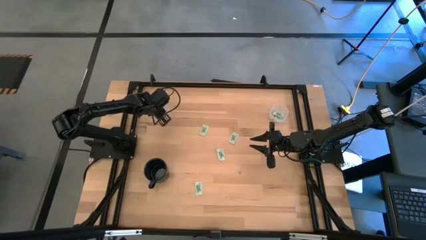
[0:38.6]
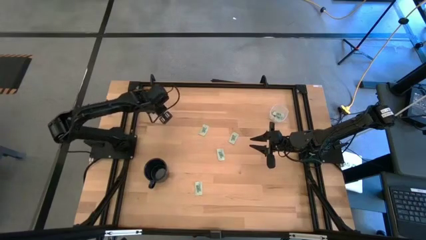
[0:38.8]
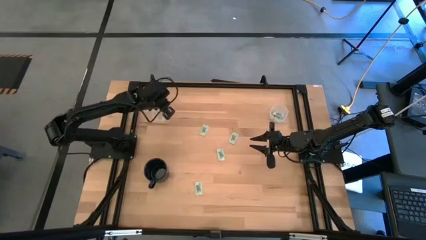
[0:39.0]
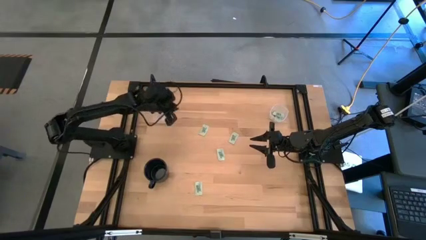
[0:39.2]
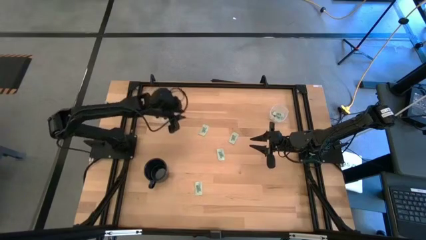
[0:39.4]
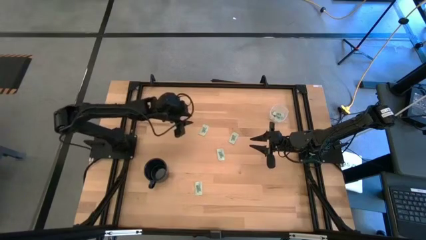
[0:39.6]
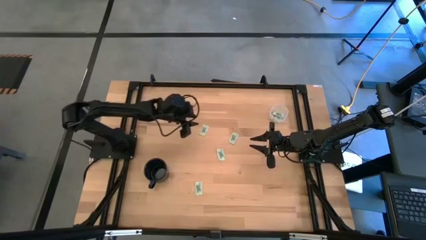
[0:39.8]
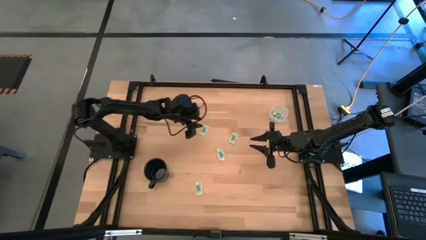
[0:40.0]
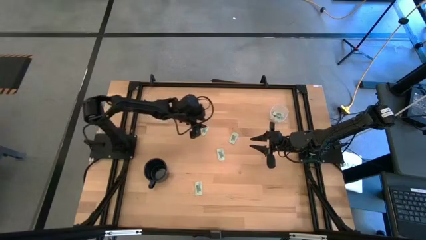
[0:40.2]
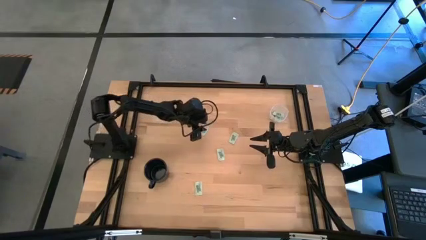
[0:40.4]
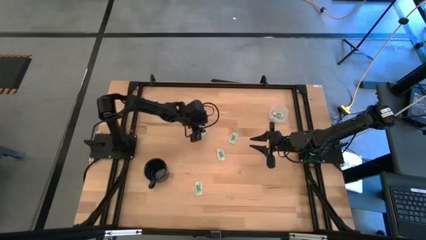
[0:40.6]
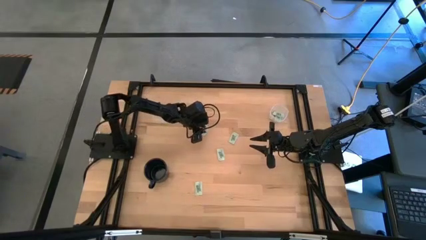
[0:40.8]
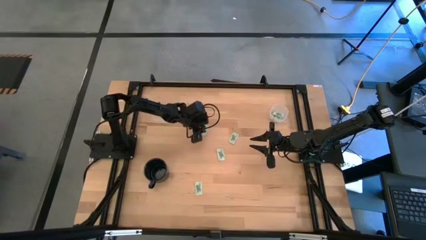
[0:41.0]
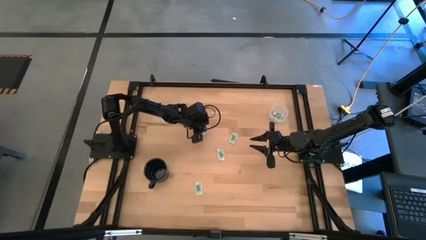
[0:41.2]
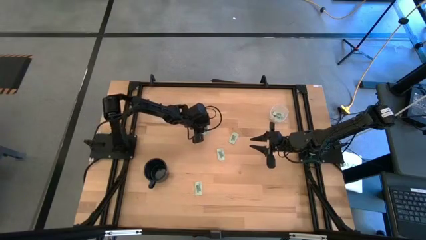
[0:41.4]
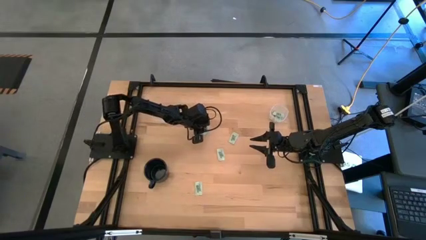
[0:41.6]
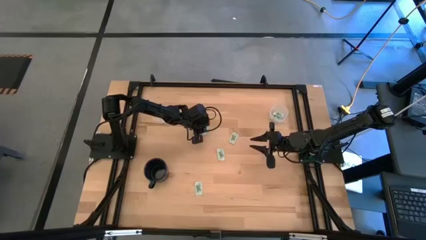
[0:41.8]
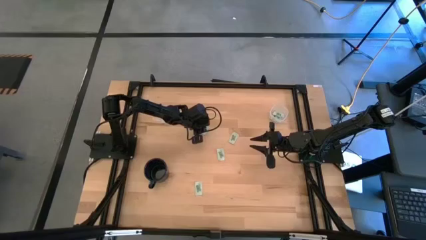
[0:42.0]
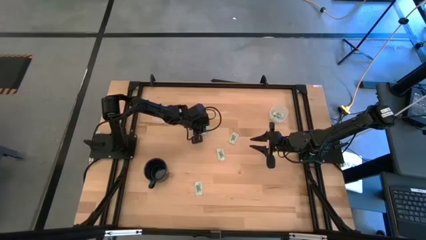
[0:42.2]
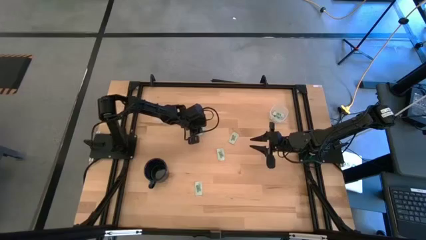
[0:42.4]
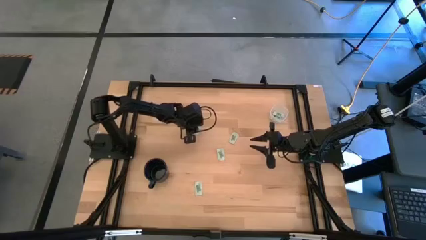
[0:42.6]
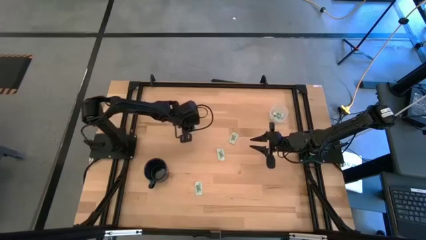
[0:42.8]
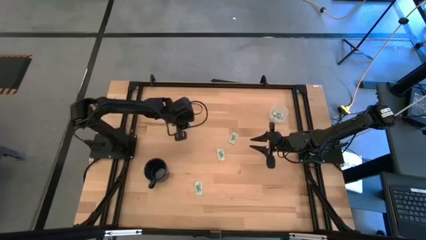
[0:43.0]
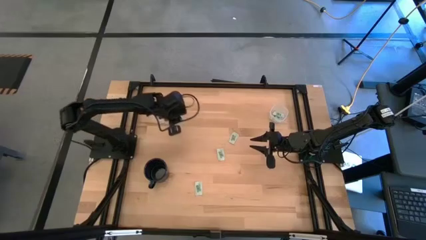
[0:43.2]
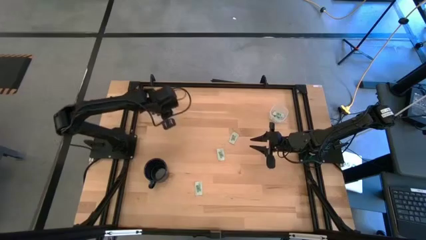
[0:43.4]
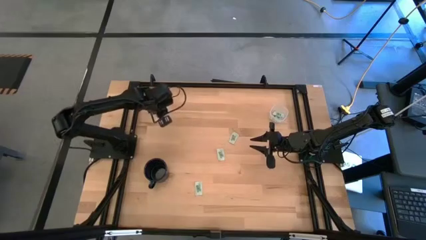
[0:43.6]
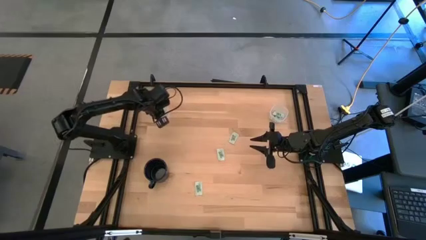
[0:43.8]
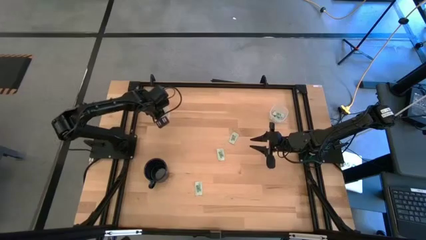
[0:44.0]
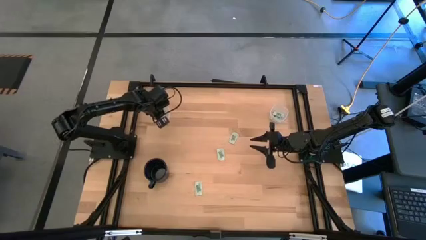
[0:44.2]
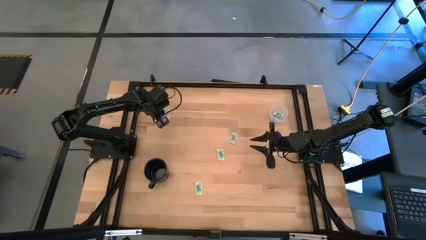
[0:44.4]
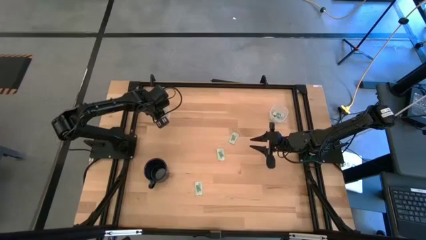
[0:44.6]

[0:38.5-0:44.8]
Task: Pick and place Stevia / Truvia into bins
Put the stevia packet into the left transparent container

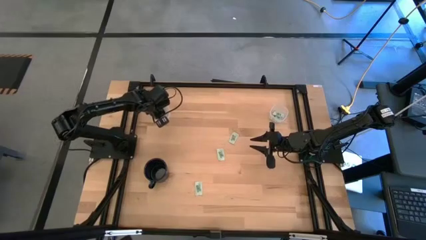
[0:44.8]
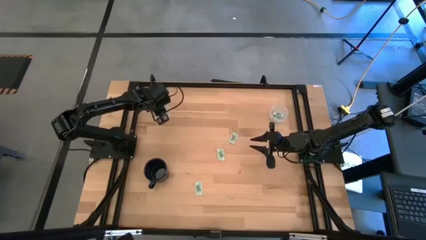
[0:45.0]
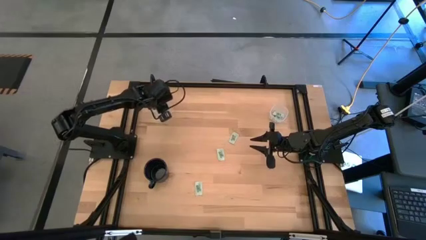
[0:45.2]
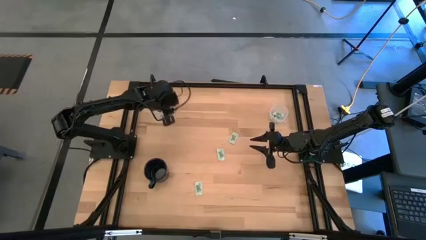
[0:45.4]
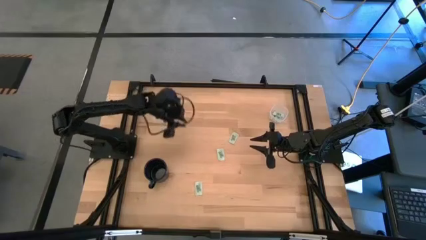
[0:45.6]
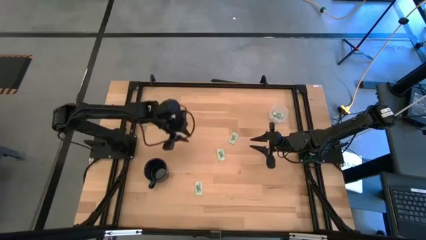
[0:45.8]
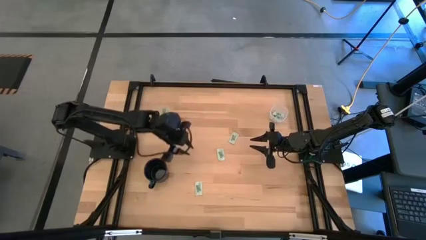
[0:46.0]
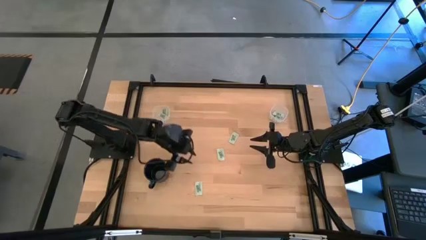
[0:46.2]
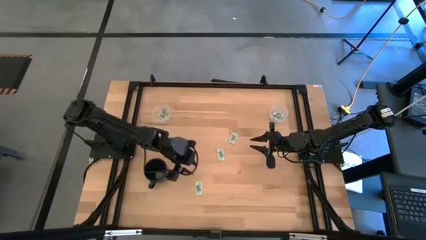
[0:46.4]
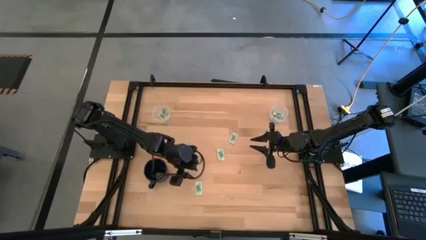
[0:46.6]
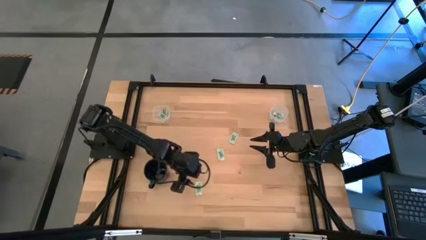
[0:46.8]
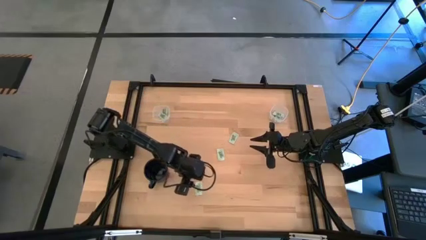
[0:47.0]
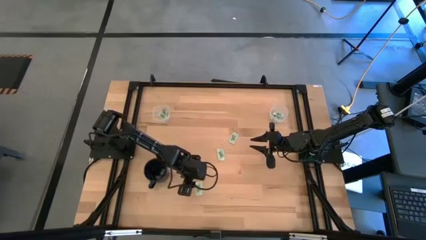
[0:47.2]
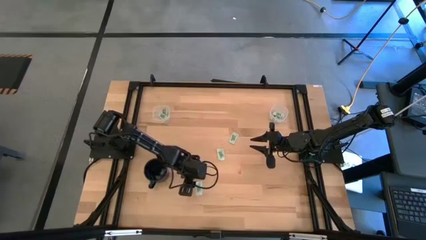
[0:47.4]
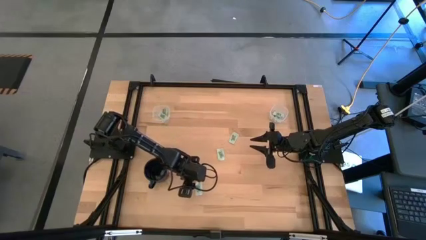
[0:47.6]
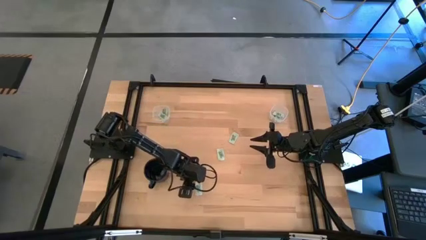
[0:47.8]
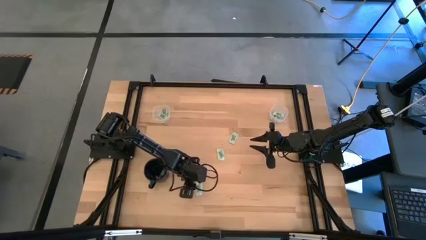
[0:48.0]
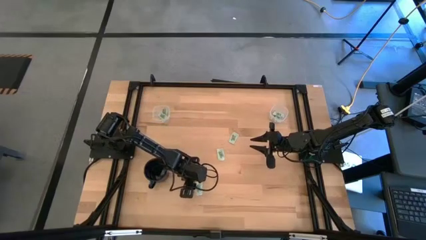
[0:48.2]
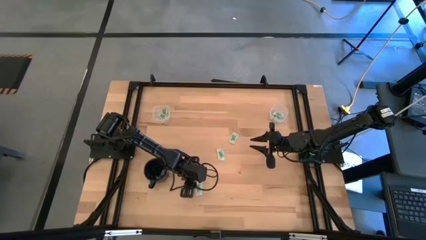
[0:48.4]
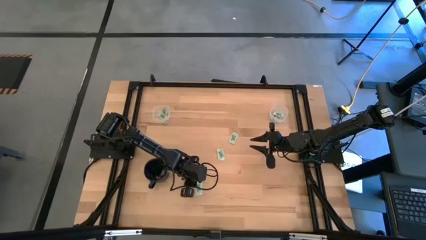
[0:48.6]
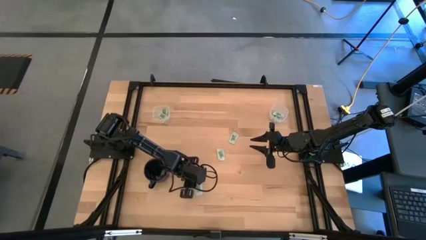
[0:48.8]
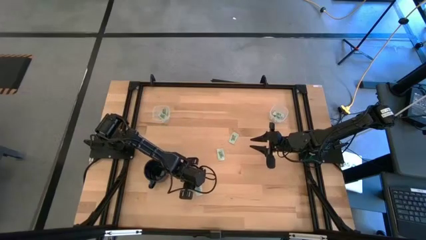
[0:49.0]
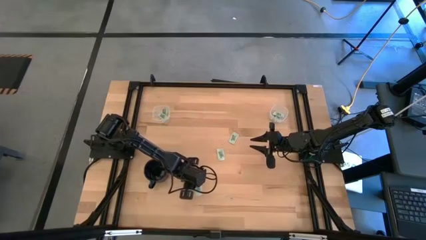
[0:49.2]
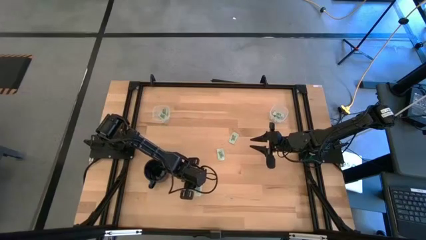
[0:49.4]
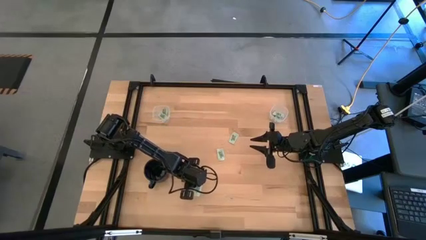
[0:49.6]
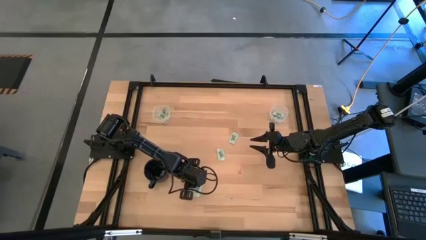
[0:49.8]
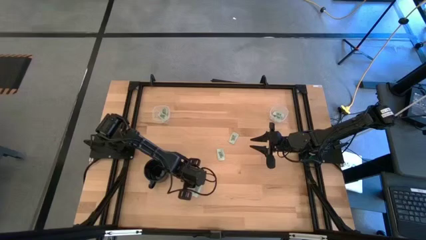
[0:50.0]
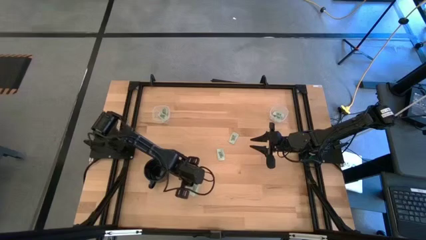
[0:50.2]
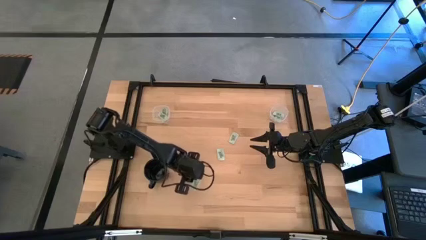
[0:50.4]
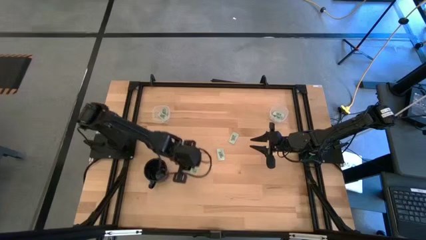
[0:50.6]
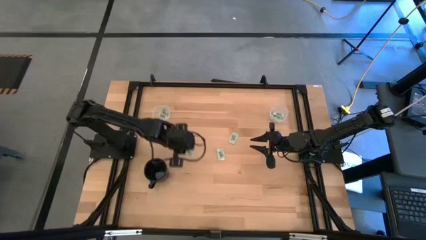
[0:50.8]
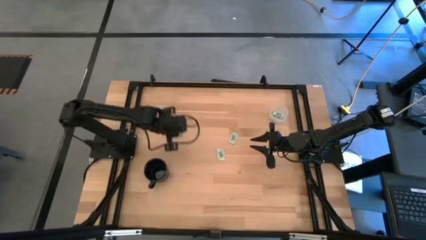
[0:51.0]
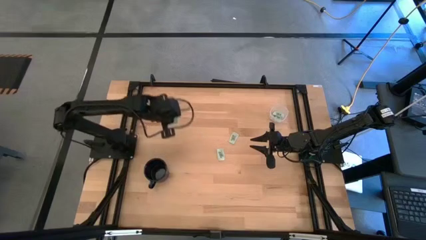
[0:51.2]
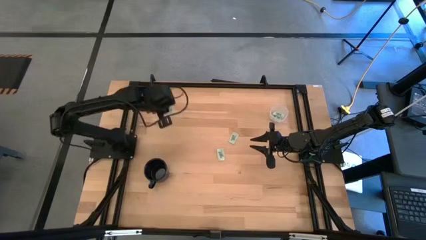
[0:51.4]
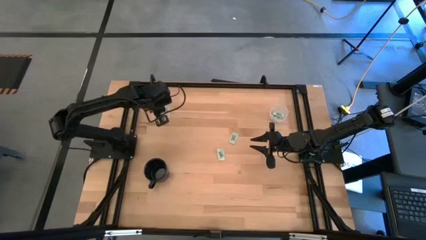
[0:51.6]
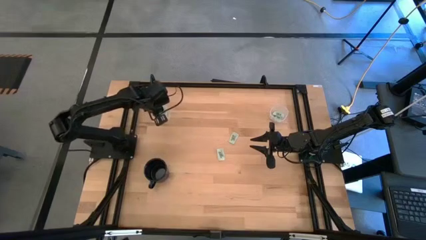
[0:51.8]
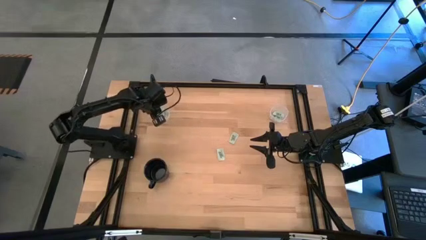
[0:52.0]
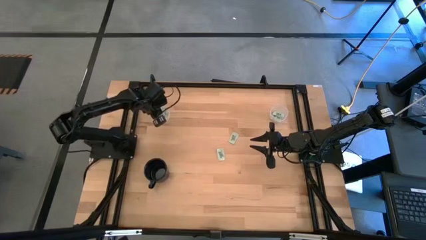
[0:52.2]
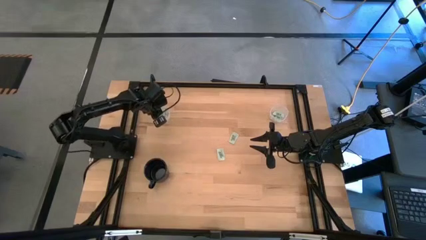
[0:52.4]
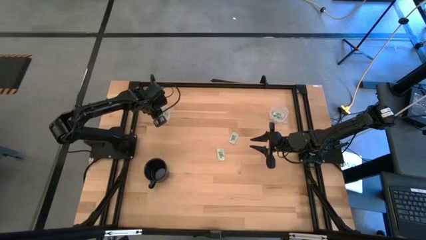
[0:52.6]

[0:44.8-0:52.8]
Put the stevia packet into the left transparent container

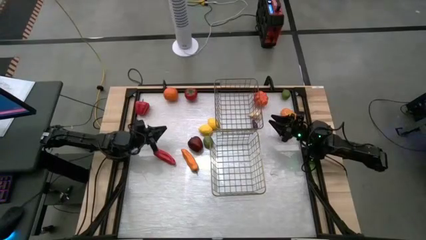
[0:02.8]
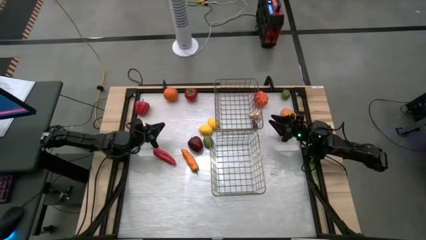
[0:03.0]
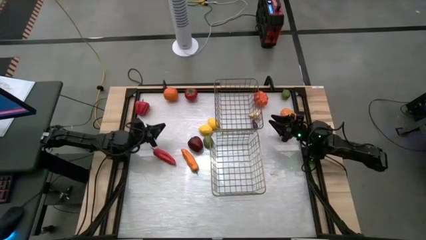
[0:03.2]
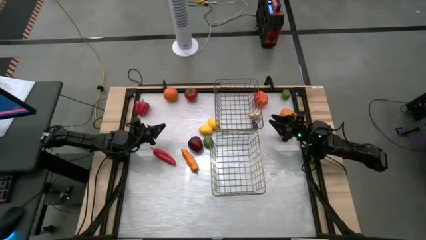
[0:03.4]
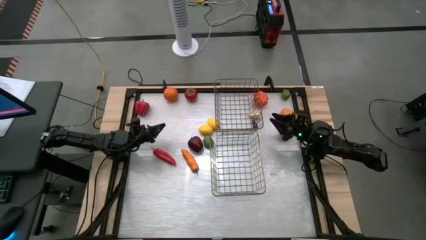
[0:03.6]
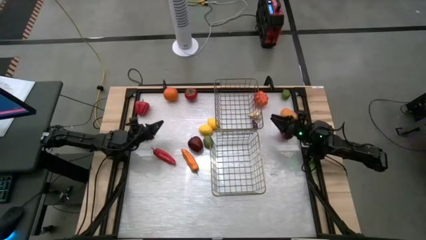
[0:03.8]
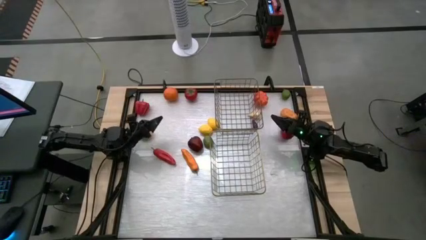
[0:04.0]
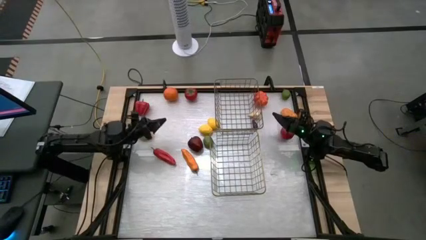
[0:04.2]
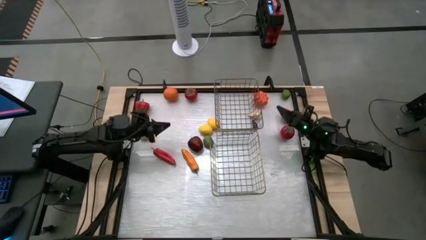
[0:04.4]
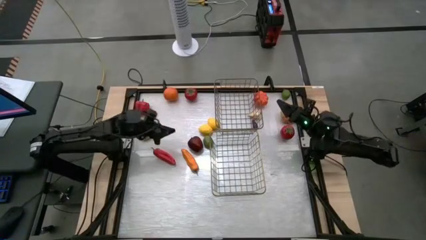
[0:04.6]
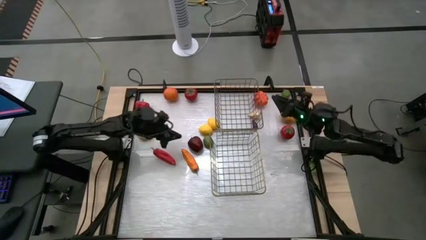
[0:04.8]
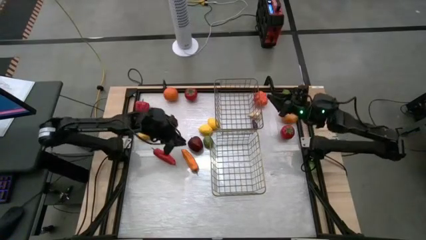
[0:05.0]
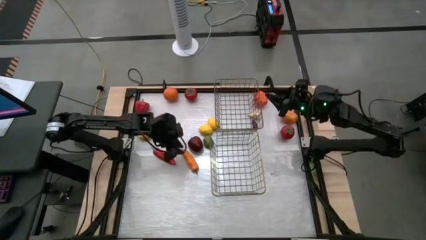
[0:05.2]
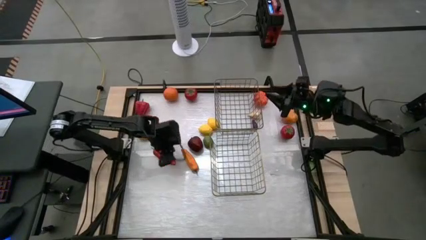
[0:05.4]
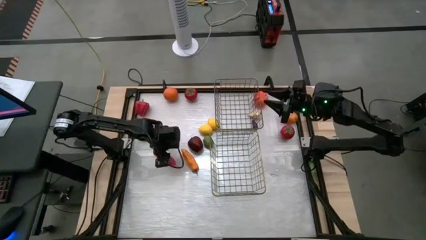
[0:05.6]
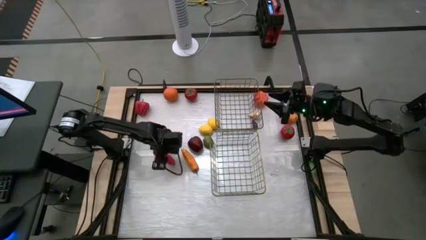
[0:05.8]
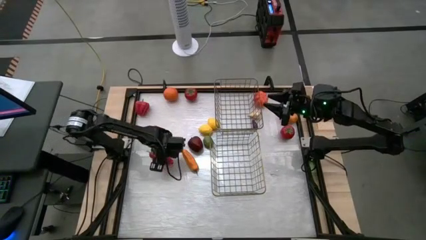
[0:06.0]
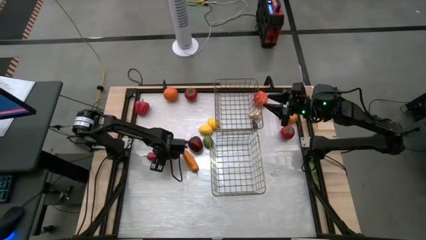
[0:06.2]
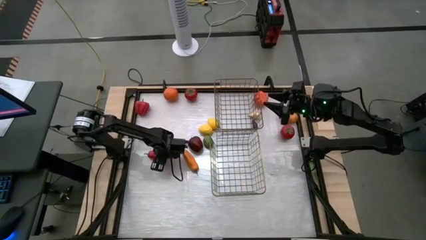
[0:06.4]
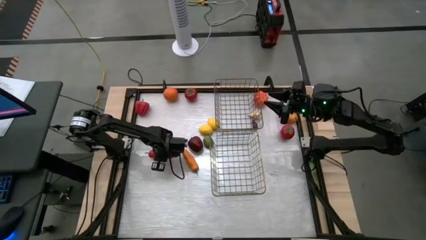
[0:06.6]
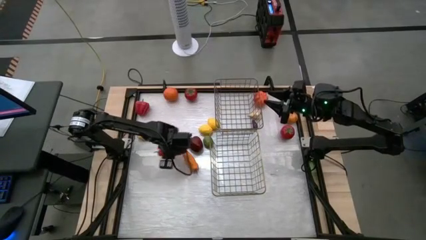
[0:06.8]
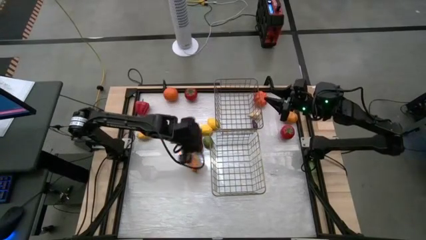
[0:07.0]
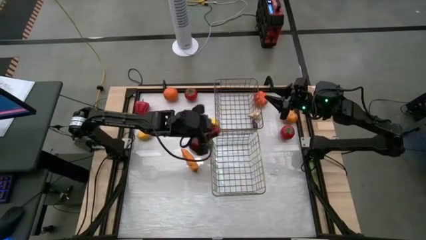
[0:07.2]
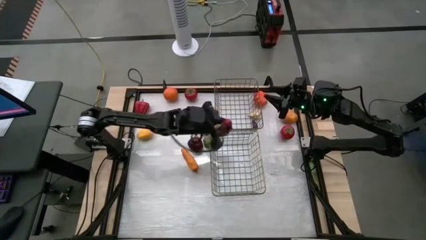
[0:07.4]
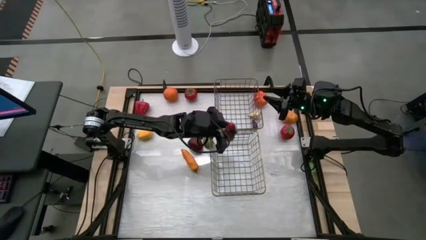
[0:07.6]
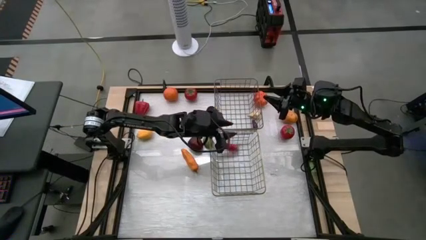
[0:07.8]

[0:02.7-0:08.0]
Task: Sort produce into baskets
Put the red chilli pepper into the bottom wire basket
